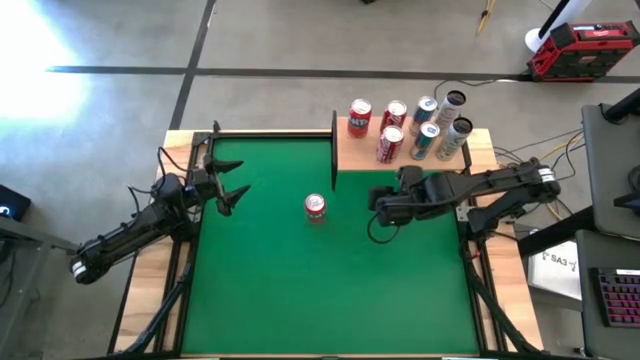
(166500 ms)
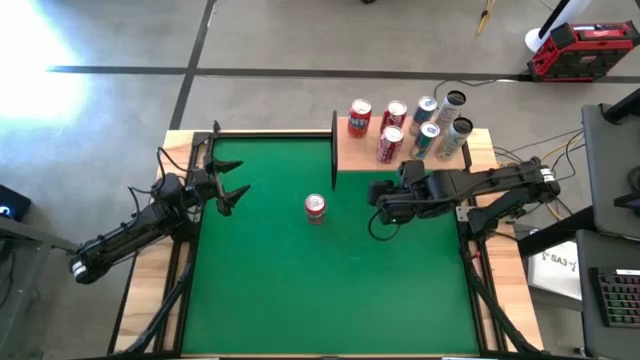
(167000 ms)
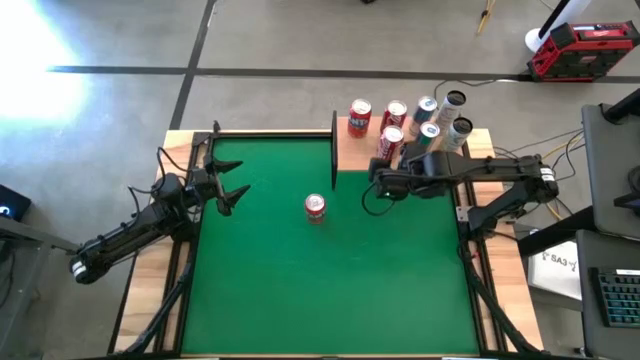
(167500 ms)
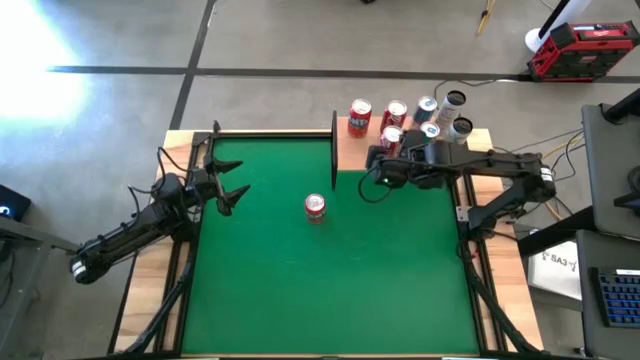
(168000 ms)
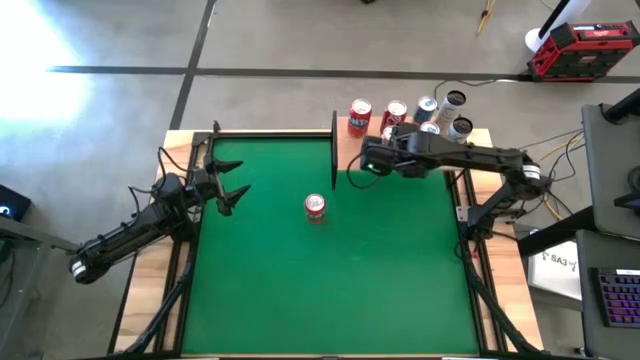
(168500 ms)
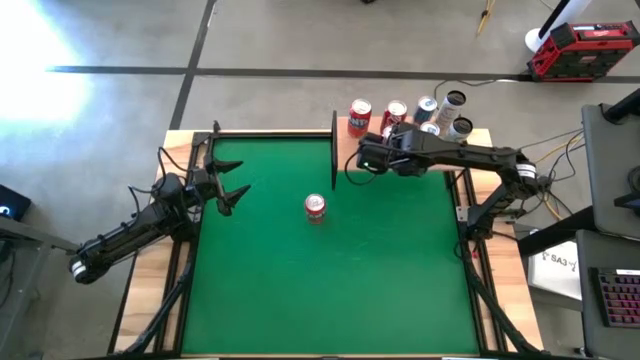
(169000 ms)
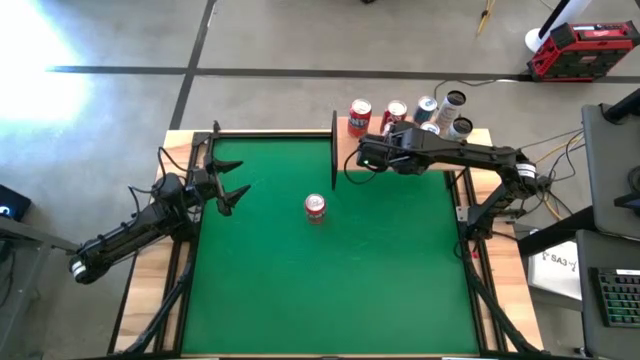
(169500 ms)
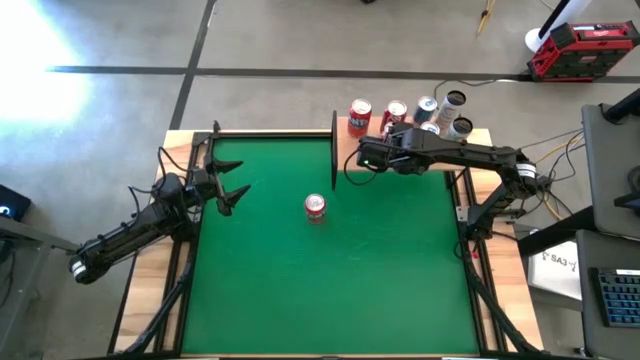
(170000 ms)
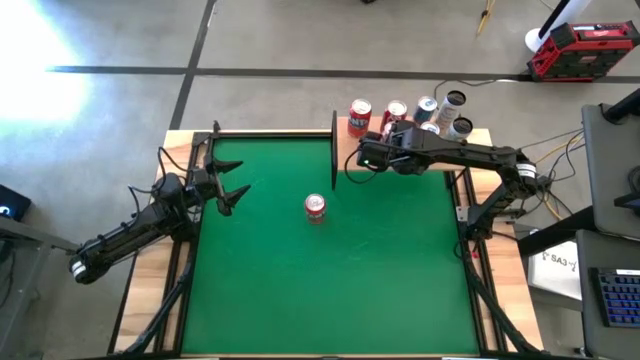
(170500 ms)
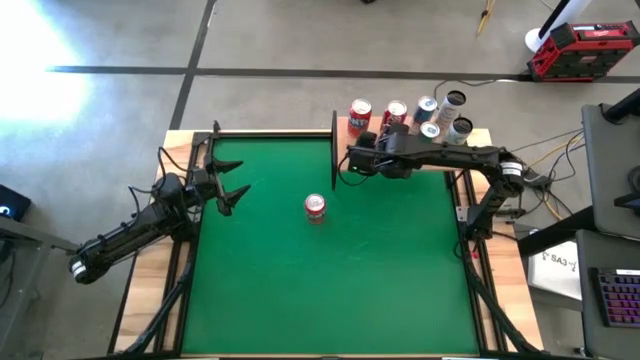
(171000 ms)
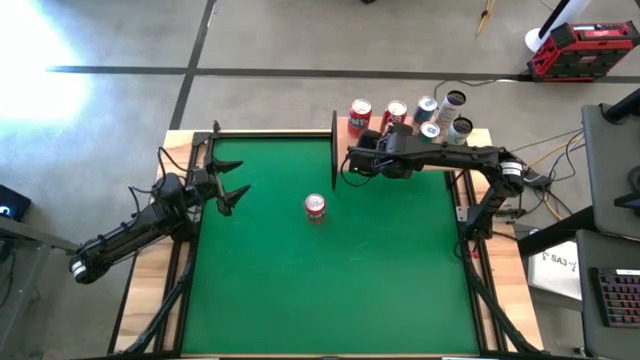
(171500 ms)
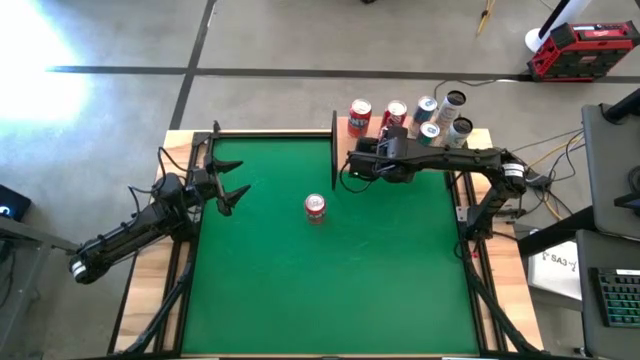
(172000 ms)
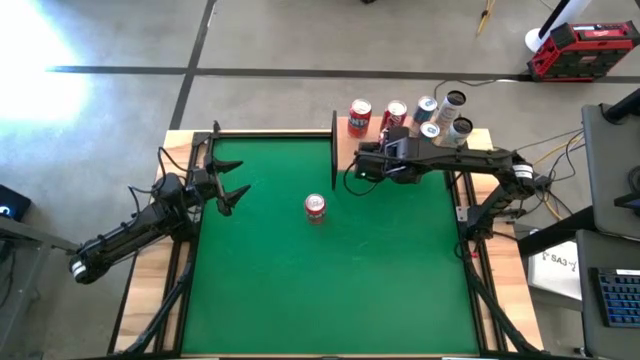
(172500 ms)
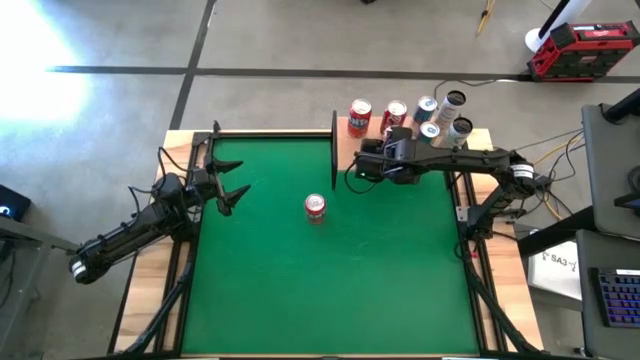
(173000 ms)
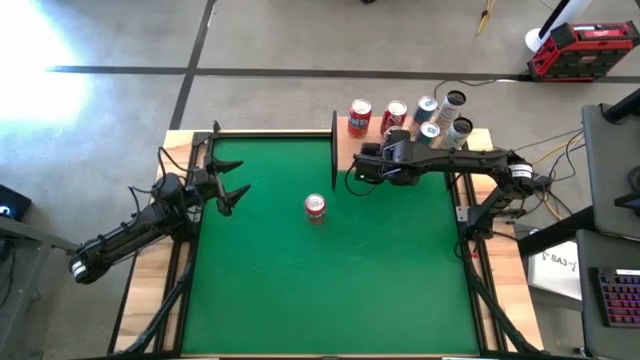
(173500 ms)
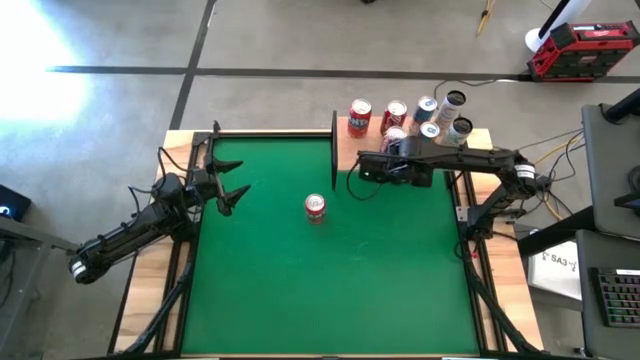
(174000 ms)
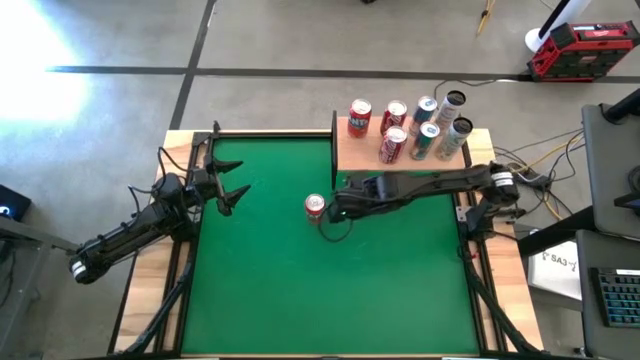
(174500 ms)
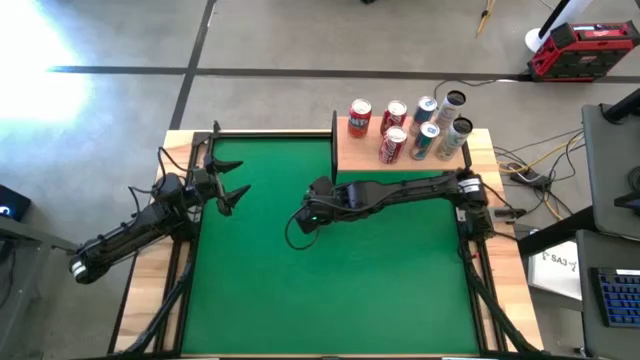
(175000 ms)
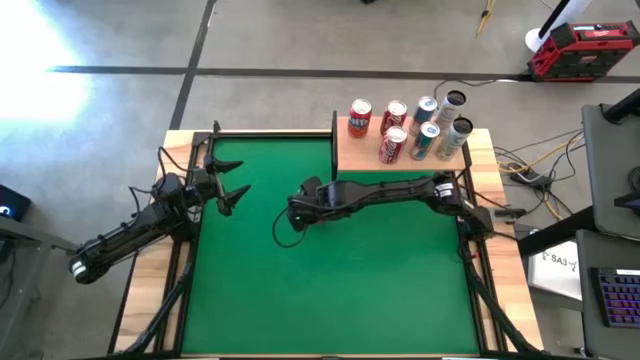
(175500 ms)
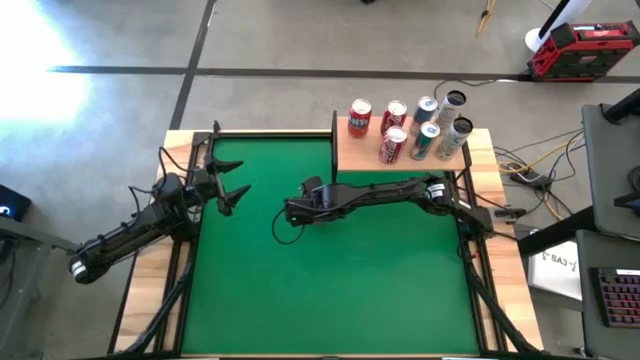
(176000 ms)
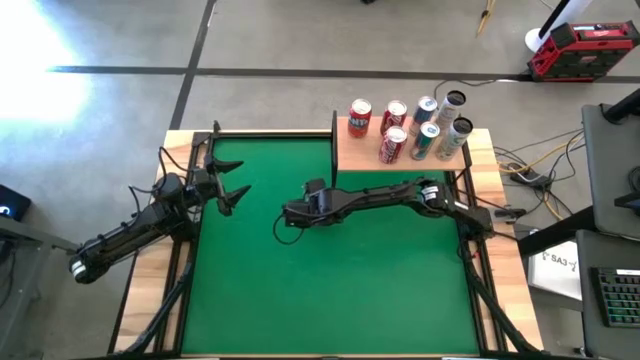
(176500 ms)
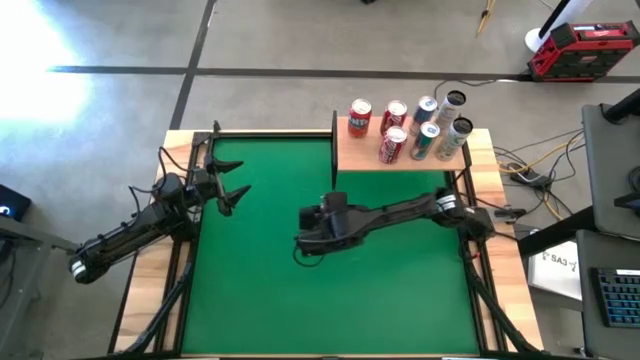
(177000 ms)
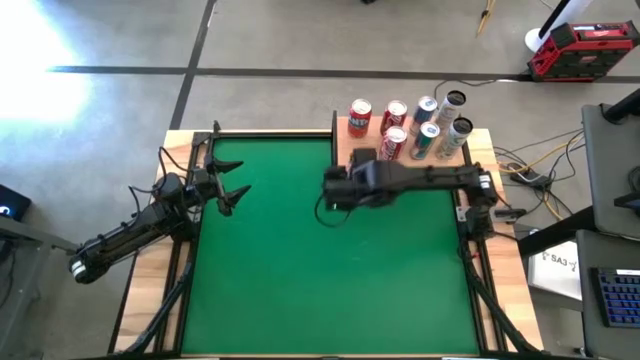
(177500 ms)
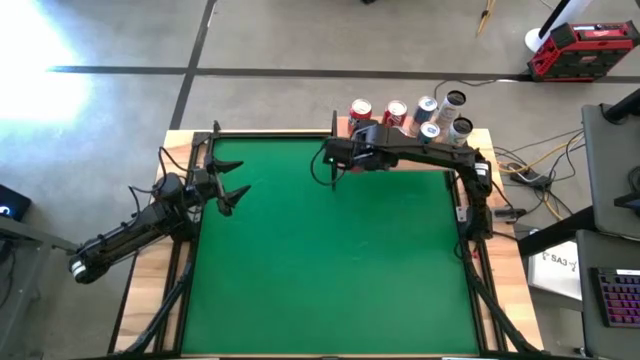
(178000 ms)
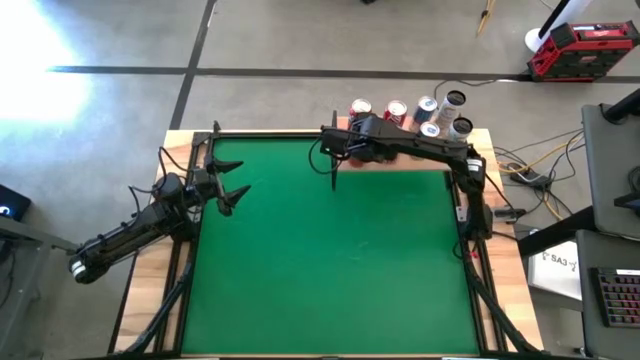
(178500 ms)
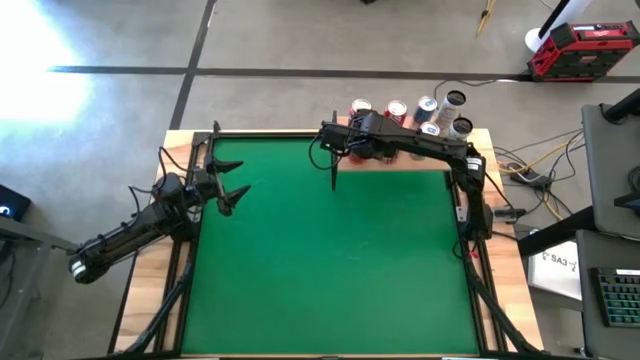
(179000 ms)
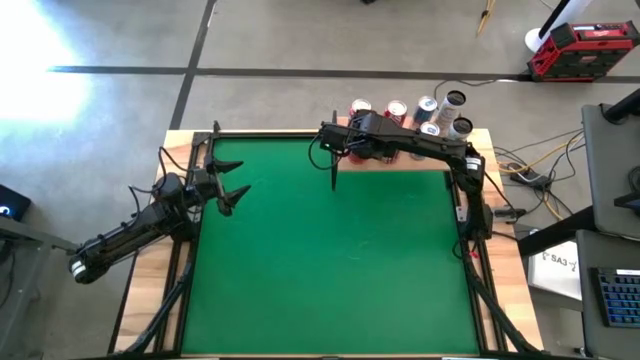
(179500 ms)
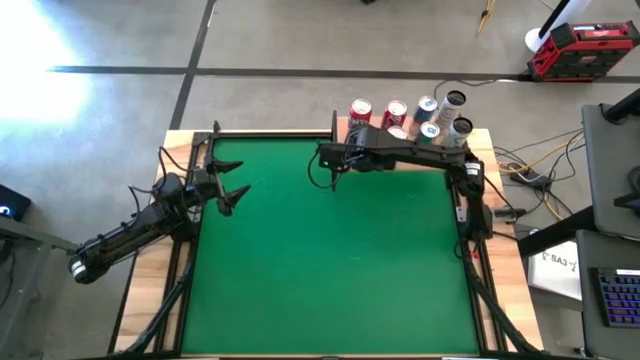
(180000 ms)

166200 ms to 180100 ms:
Task: Place canned beverage on shelf
Put the red soda can on the shelf aligned with the other red soda can

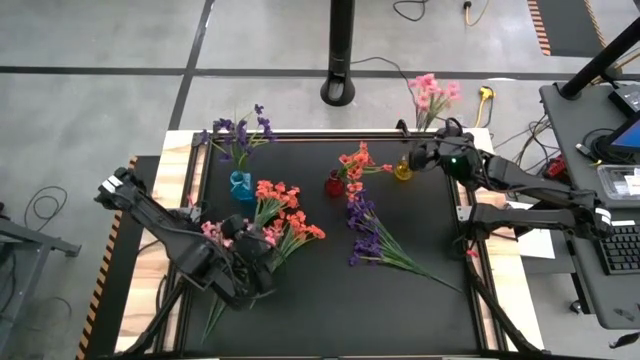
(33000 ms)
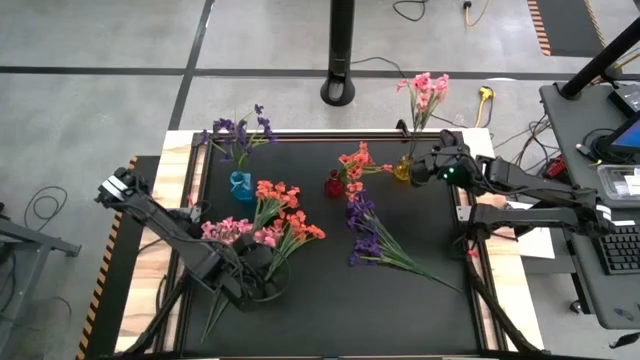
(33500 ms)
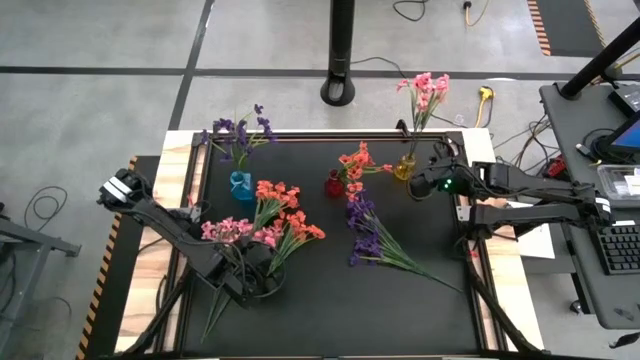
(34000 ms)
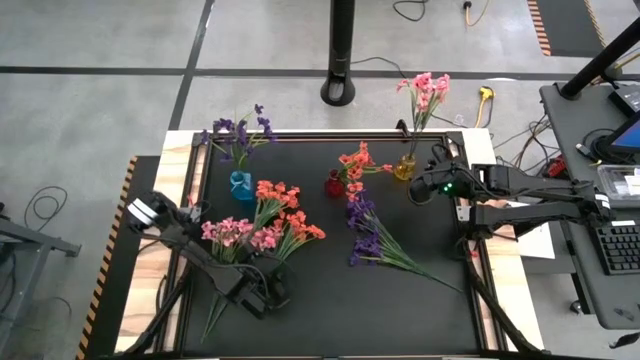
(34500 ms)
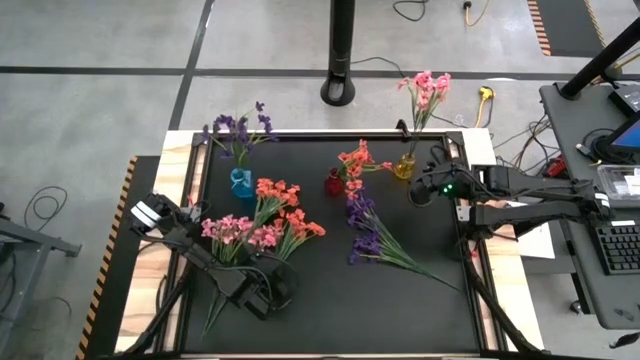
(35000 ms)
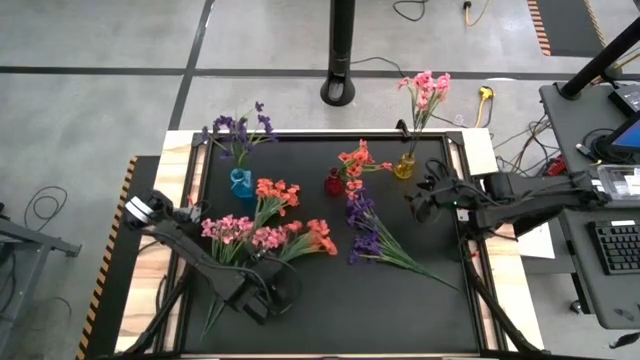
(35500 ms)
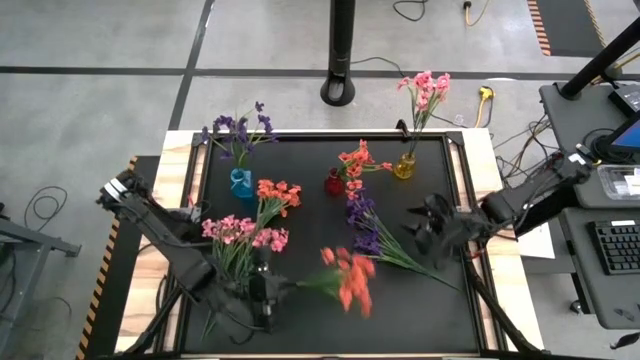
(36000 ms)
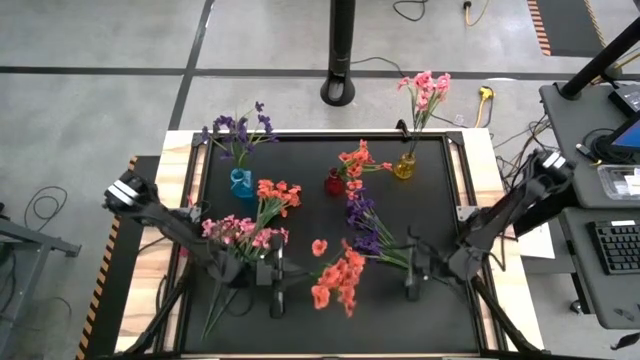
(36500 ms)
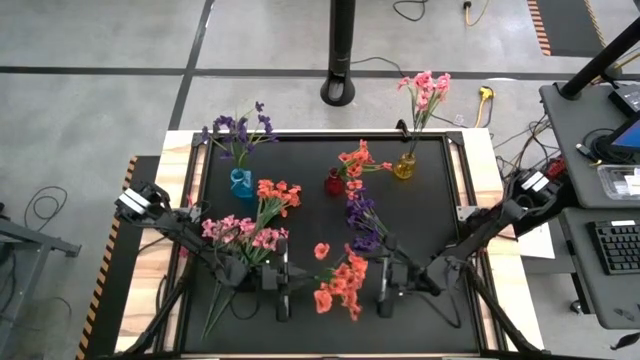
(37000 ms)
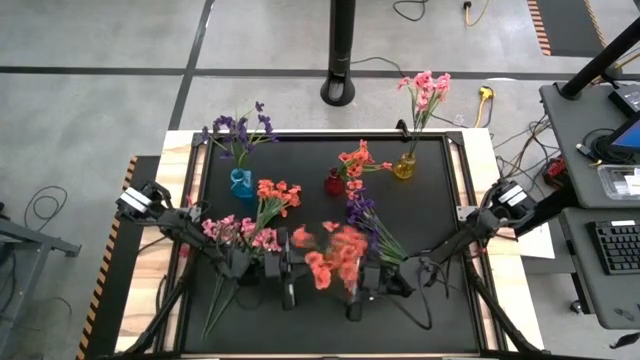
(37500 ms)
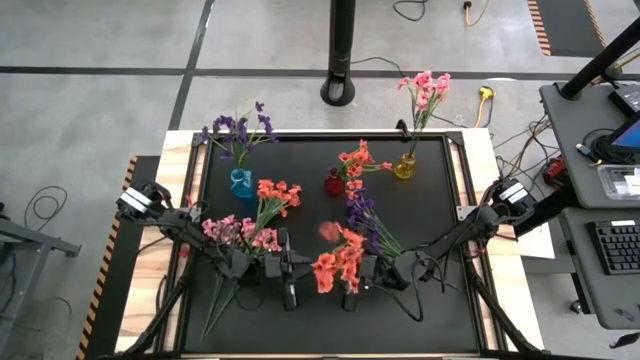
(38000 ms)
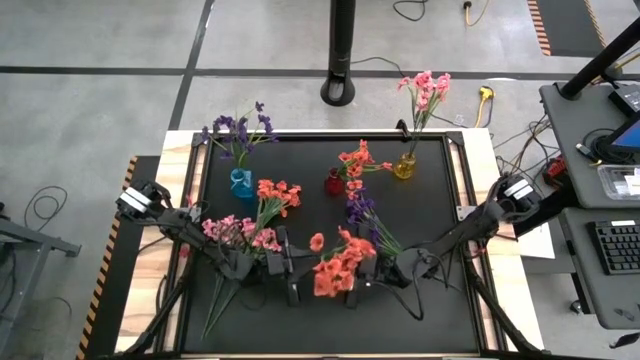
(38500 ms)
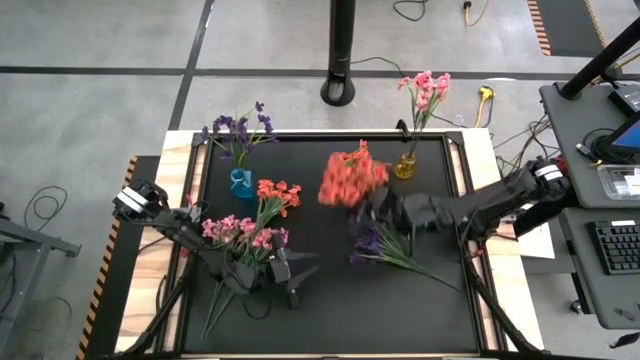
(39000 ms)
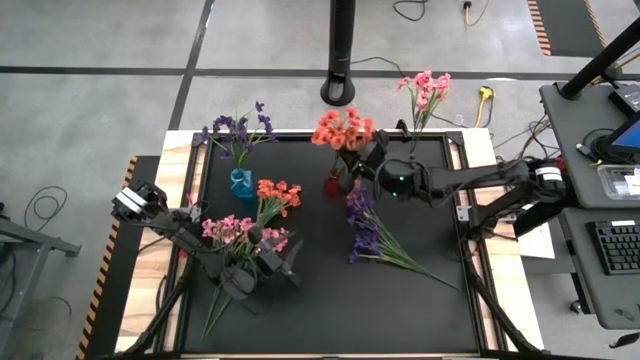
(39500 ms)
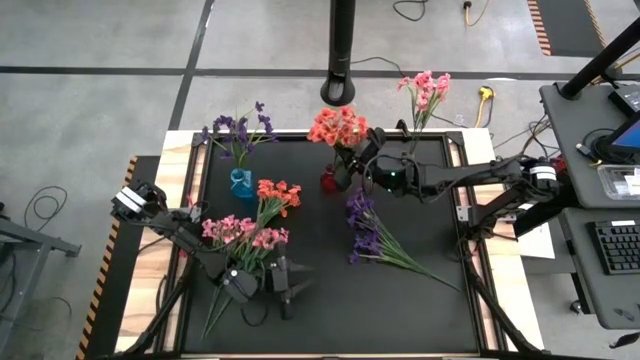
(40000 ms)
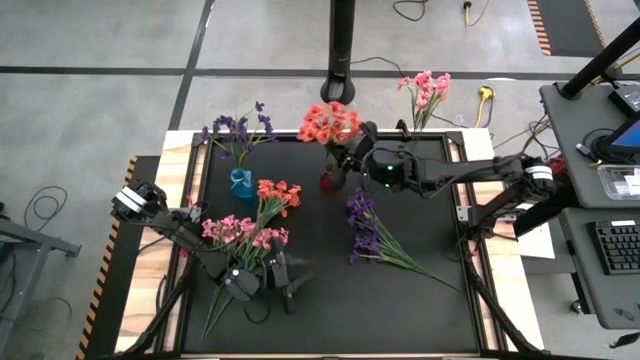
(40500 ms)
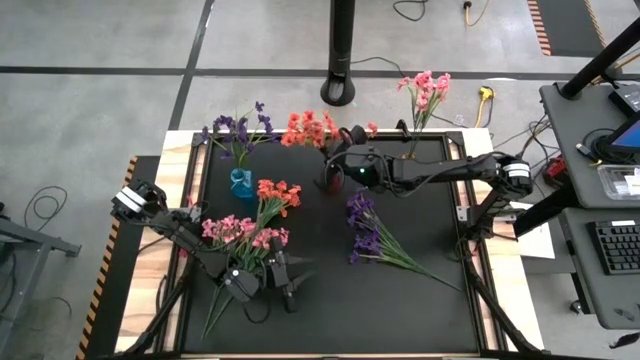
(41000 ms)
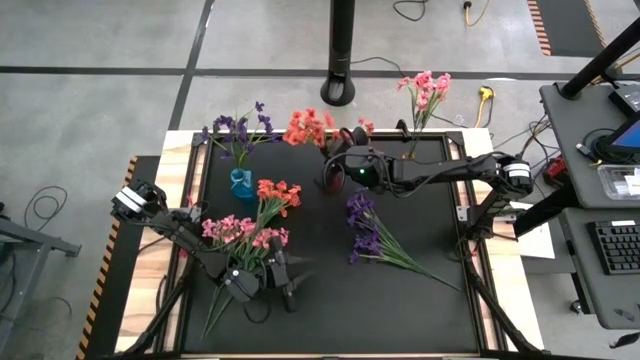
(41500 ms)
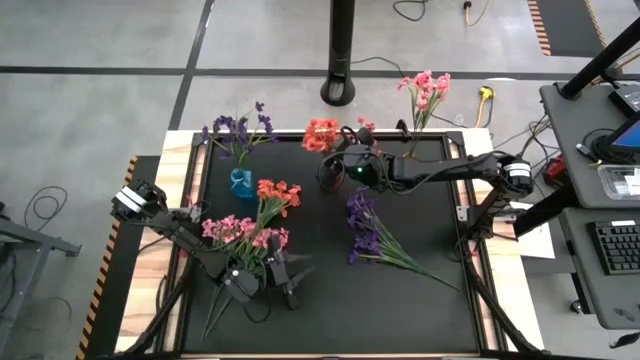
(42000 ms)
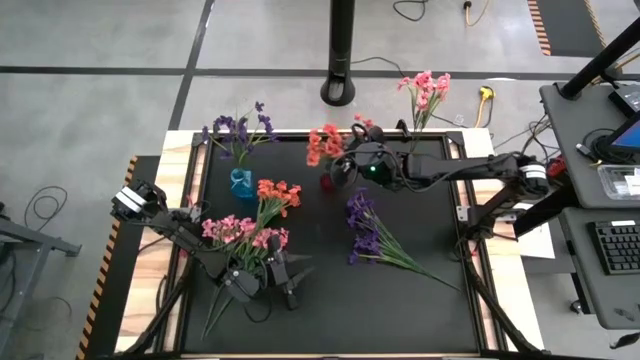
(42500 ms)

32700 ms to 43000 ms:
Task: Sort flowers into vase by color
Put the bottom orange flowers into the red vase
